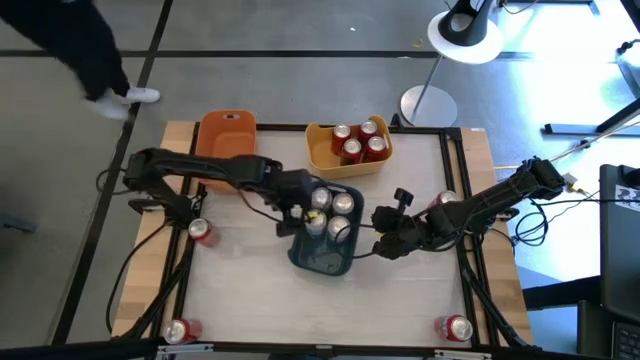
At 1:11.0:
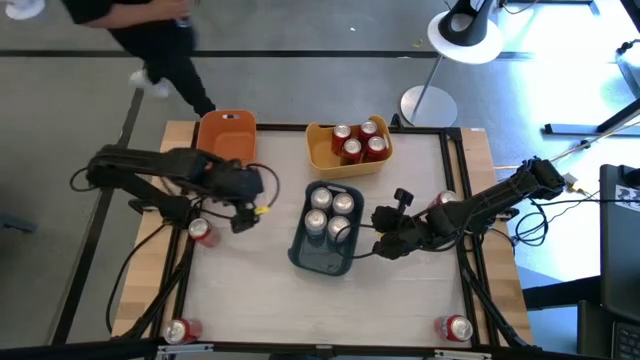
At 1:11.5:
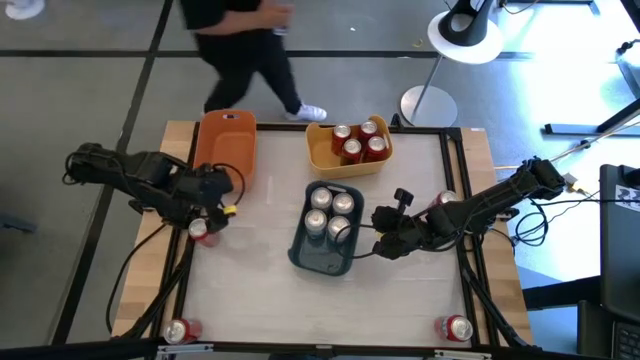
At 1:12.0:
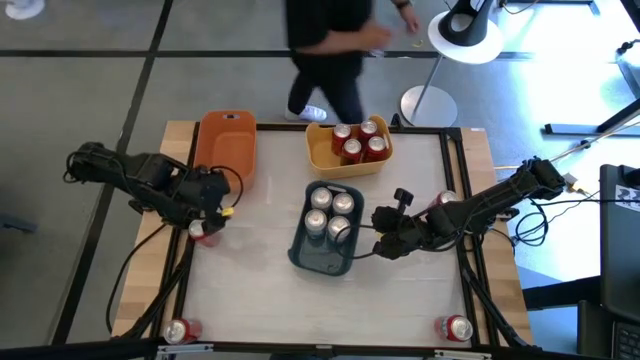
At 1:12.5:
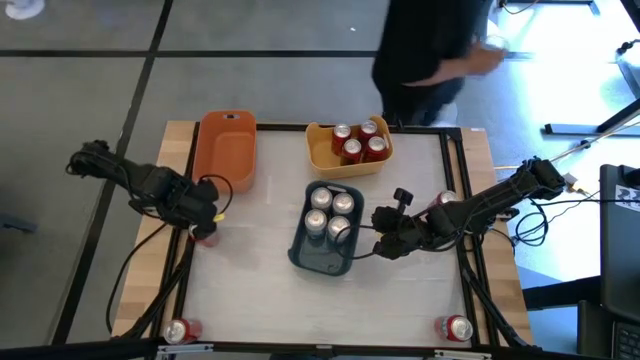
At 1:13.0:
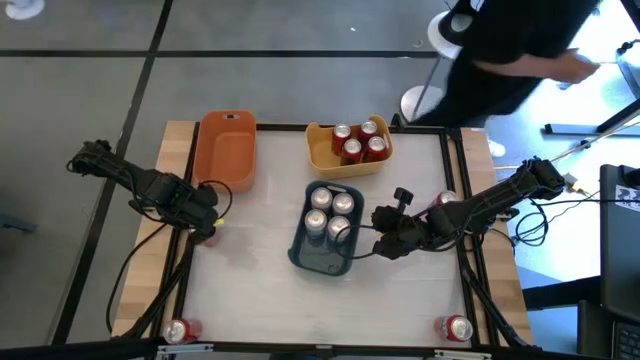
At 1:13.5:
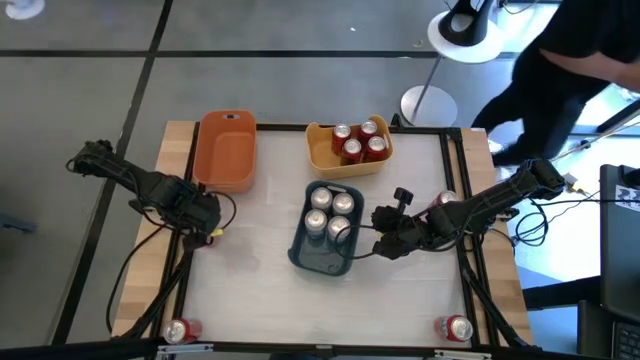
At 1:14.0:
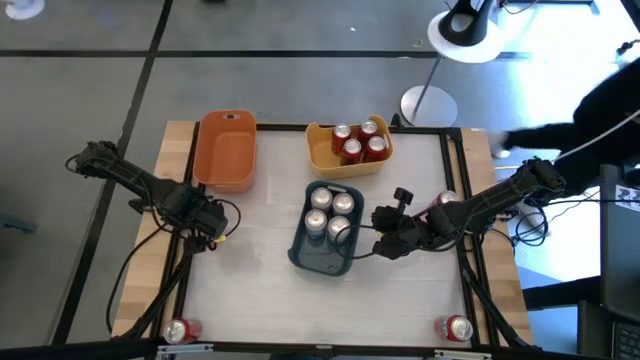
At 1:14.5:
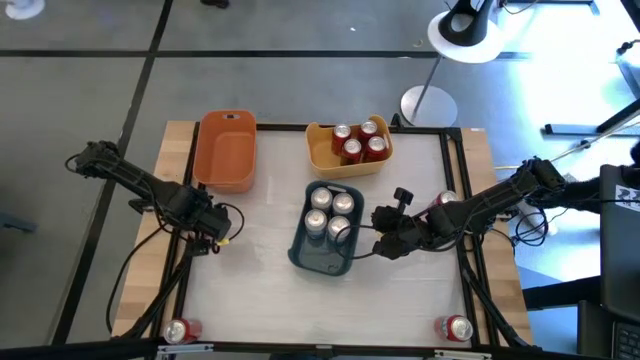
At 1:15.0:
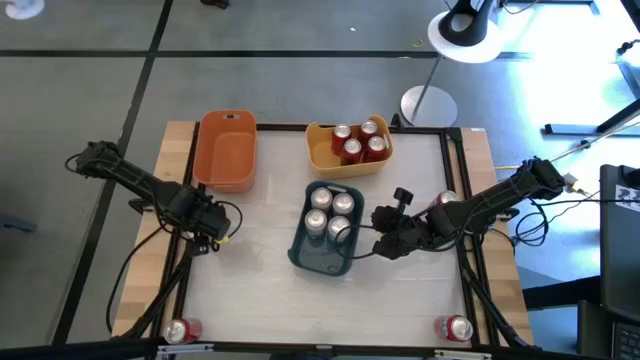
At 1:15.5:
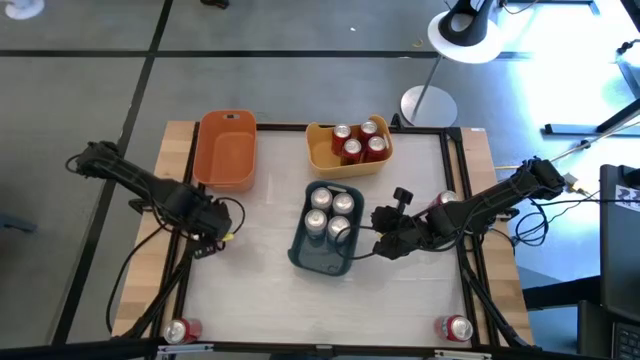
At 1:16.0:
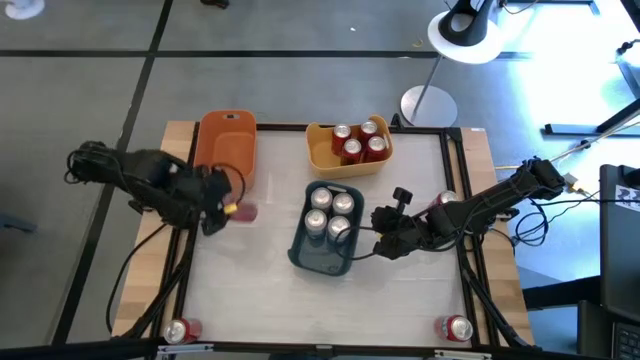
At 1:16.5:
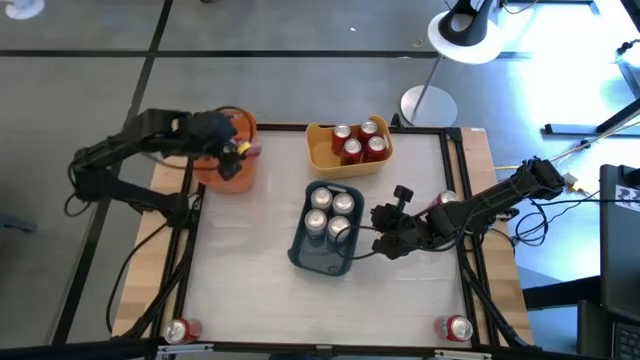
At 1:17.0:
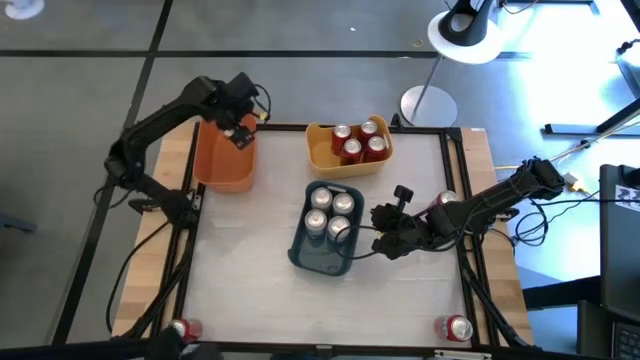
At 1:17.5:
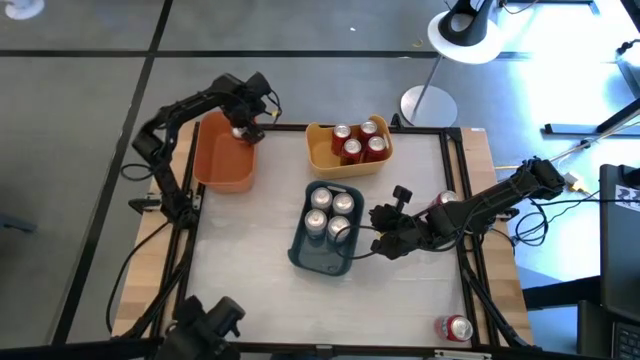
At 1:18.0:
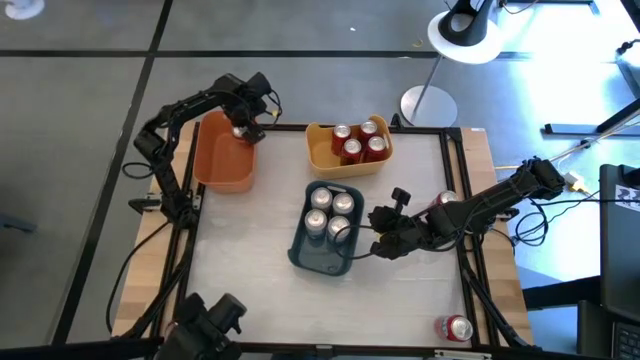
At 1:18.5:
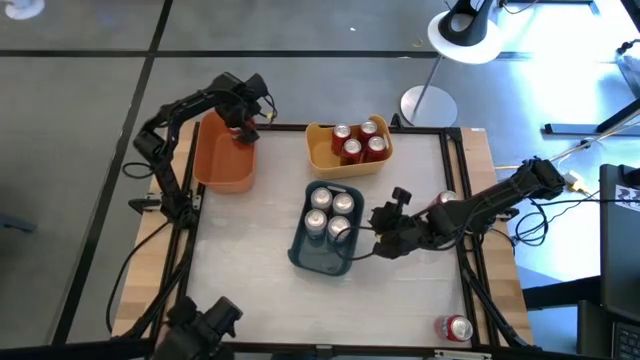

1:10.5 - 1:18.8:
Task: Sort soda cans
Put the top left orange soda can into the orange bin

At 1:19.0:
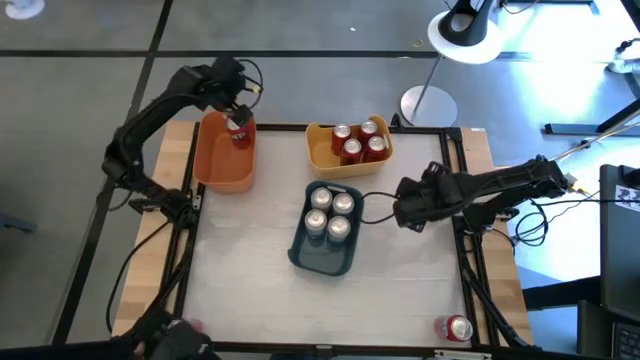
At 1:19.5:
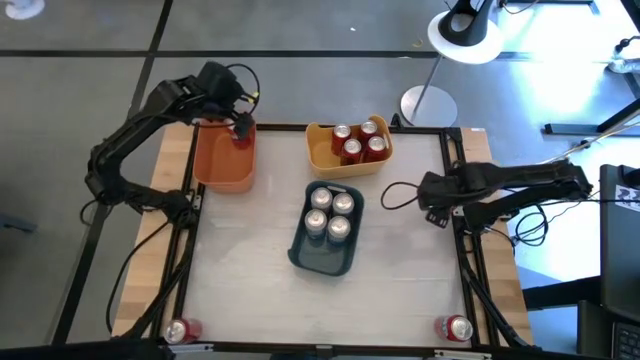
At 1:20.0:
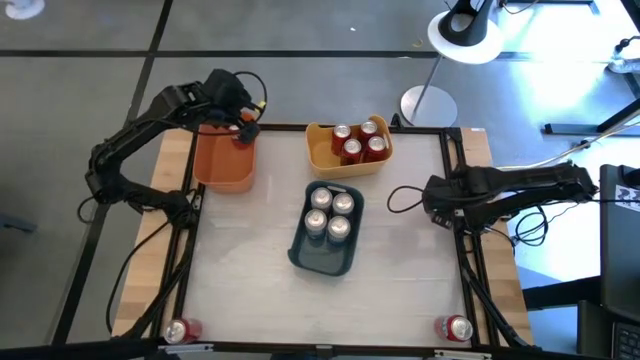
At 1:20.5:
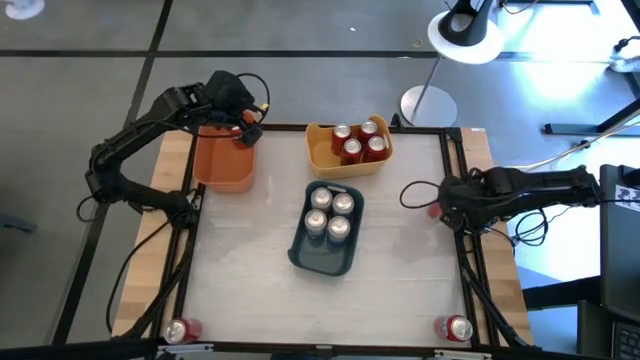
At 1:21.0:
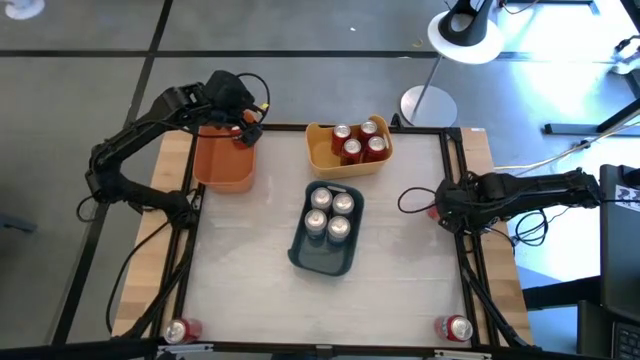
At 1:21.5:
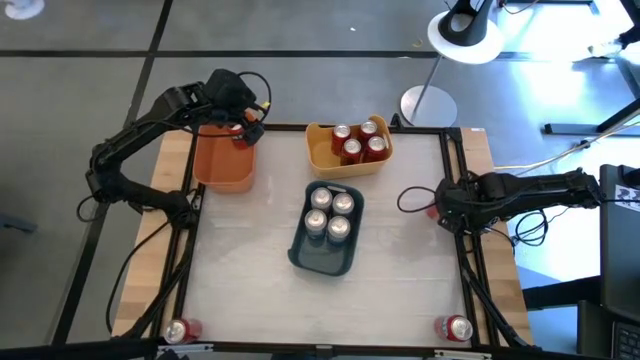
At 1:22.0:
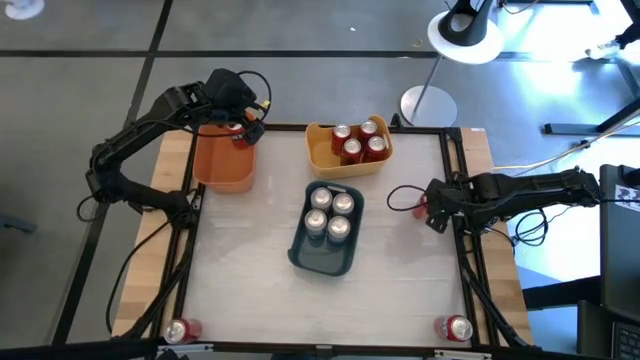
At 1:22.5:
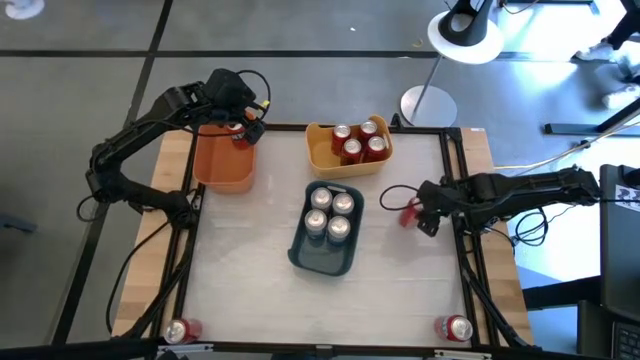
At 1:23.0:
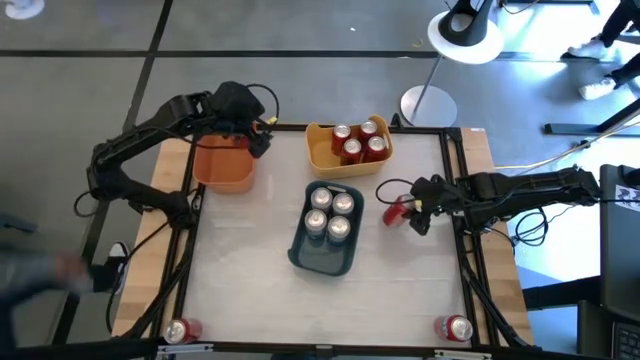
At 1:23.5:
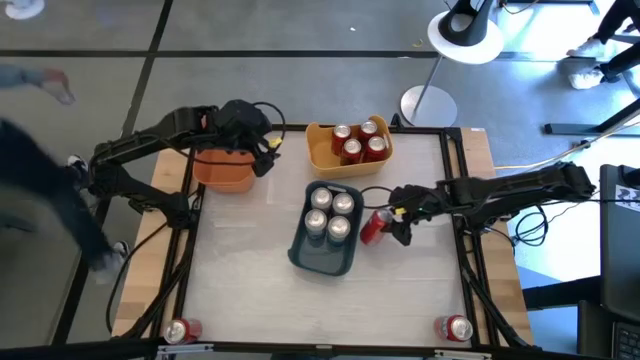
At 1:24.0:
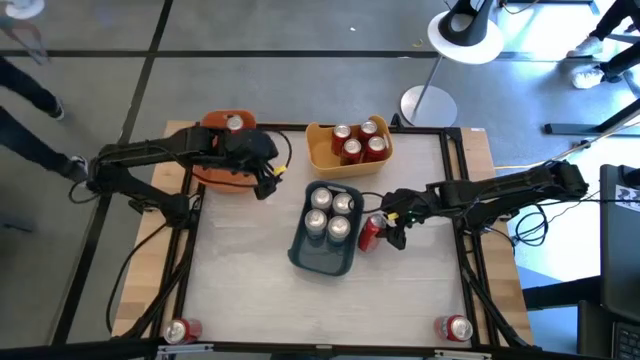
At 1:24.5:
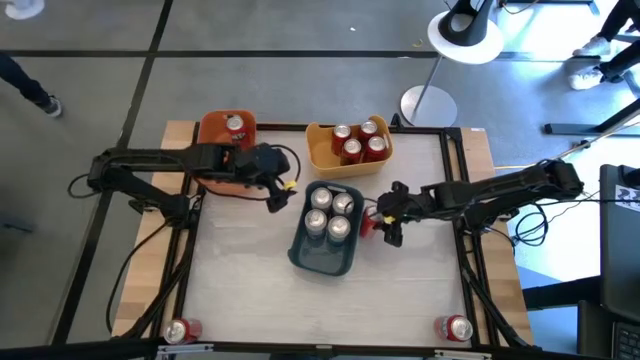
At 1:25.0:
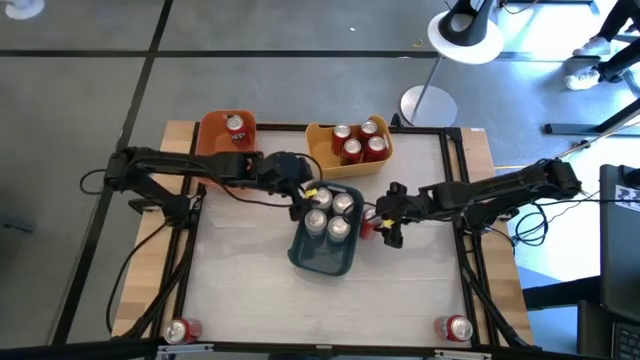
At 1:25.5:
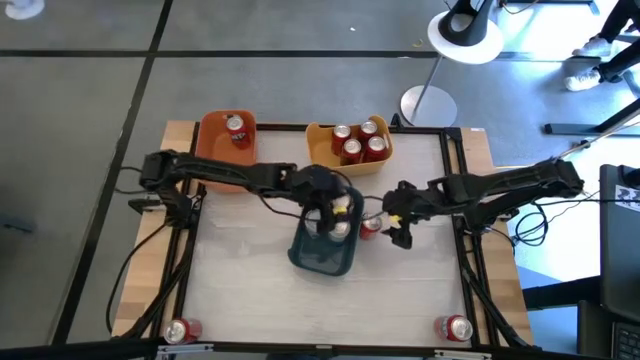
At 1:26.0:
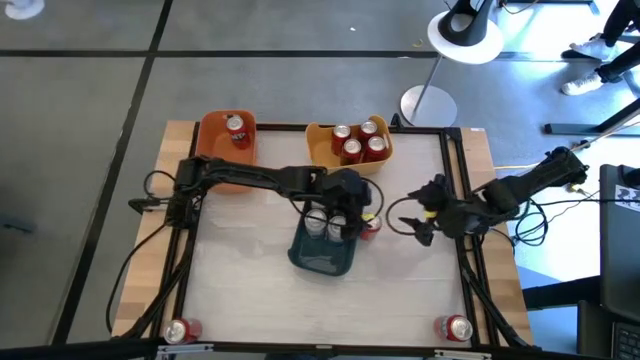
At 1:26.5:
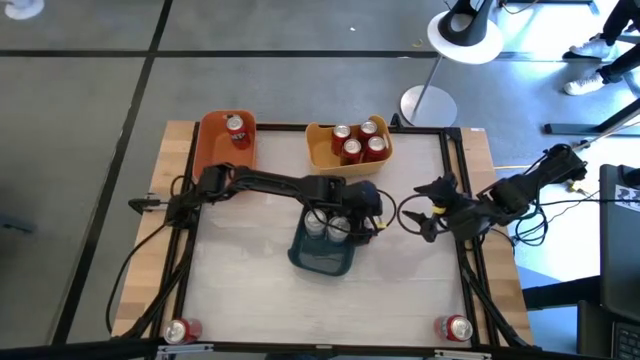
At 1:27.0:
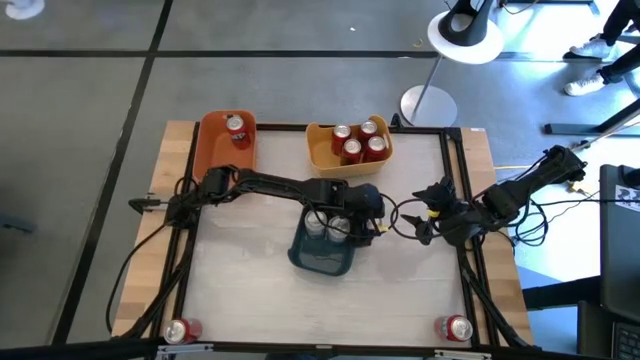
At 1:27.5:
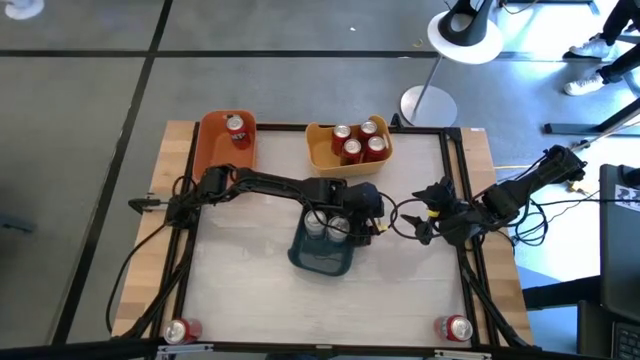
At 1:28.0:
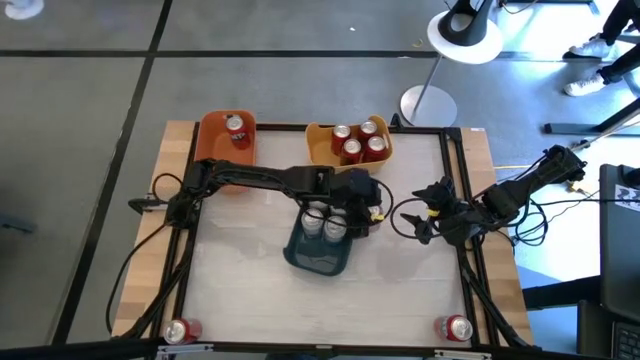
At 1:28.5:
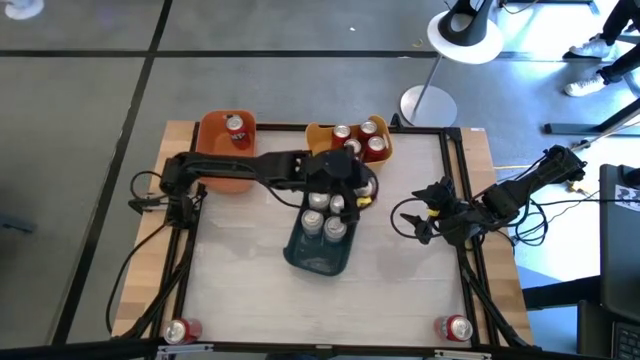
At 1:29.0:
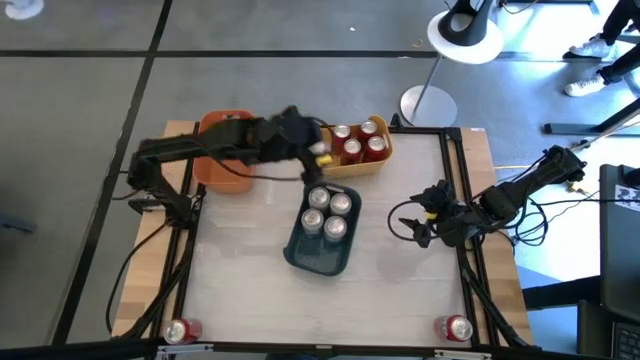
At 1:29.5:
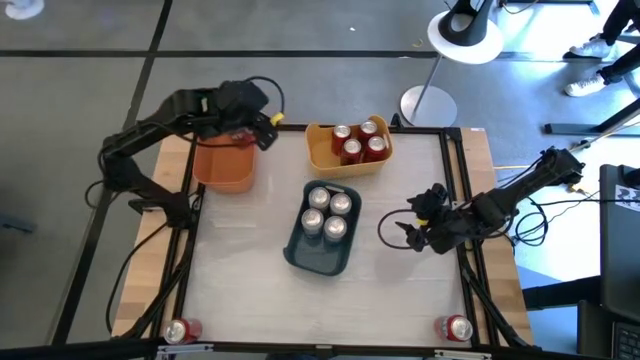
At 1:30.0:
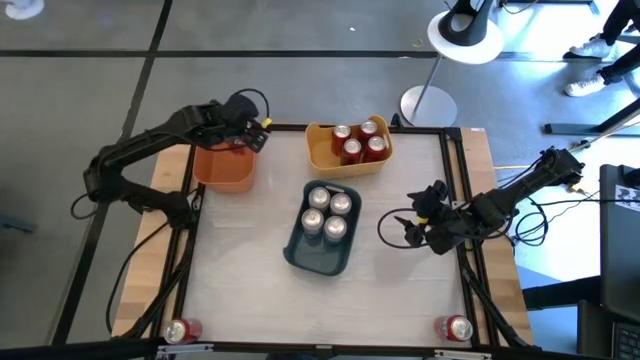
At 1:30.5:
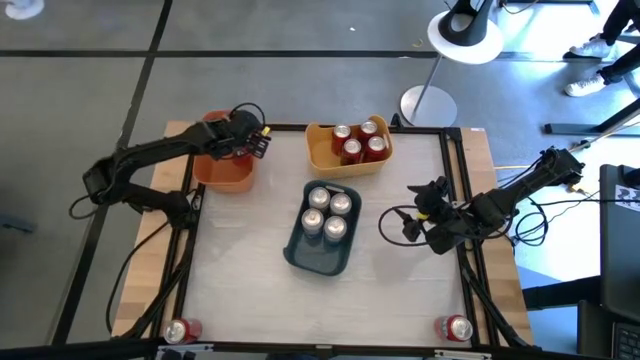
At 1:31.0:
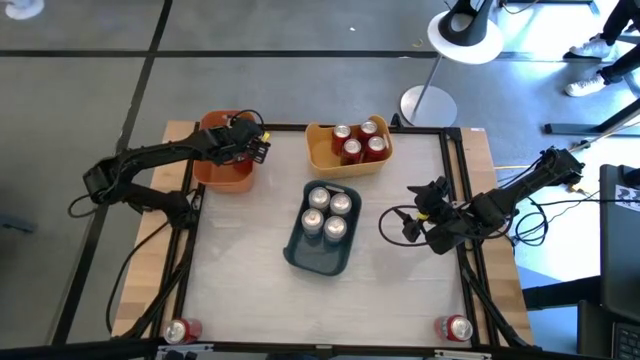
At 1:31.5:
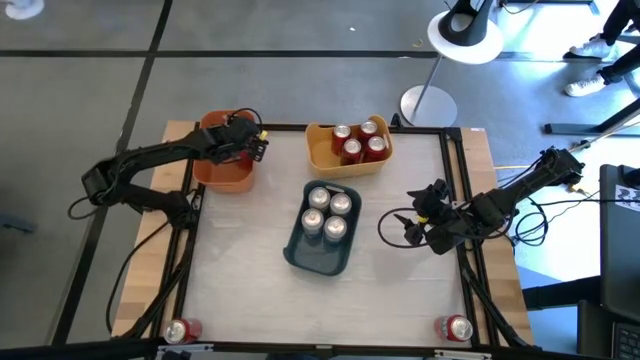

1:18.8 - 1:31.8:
Put the top orange soda can into the orange bin
